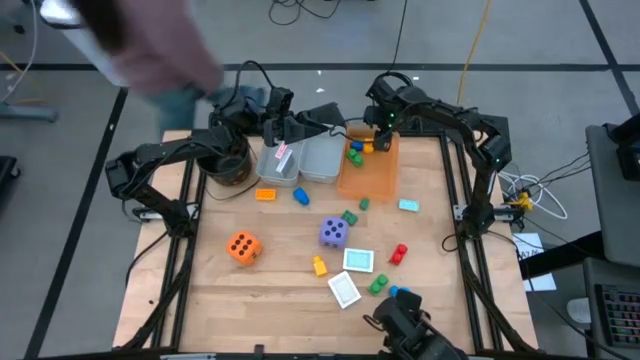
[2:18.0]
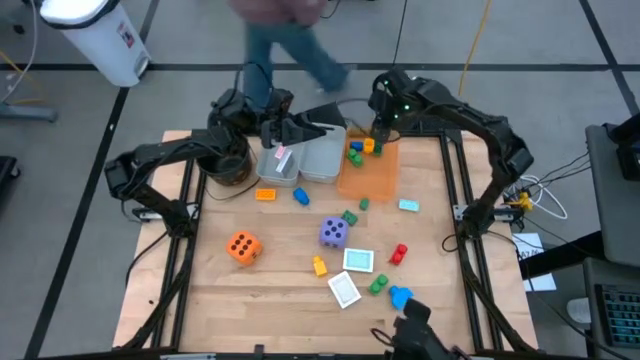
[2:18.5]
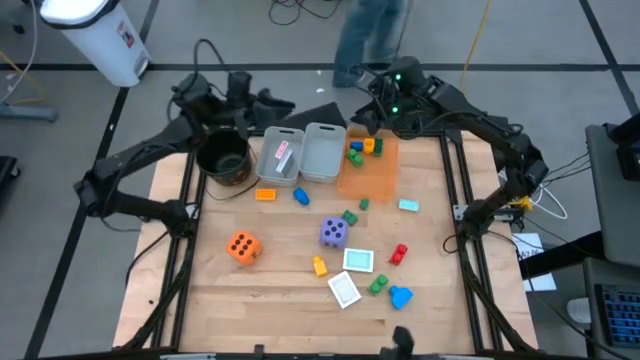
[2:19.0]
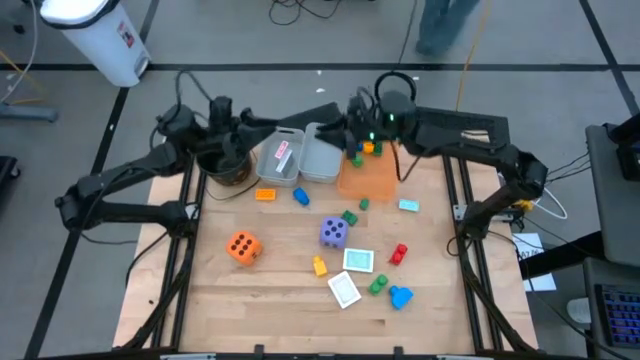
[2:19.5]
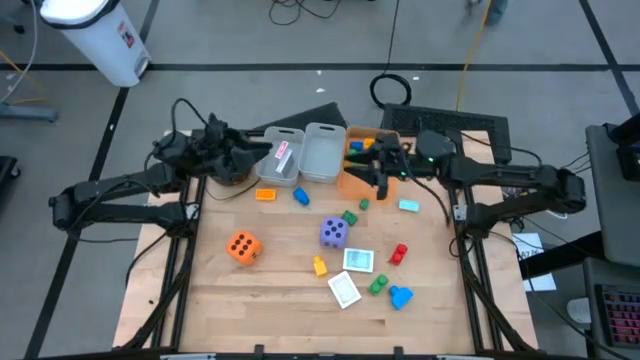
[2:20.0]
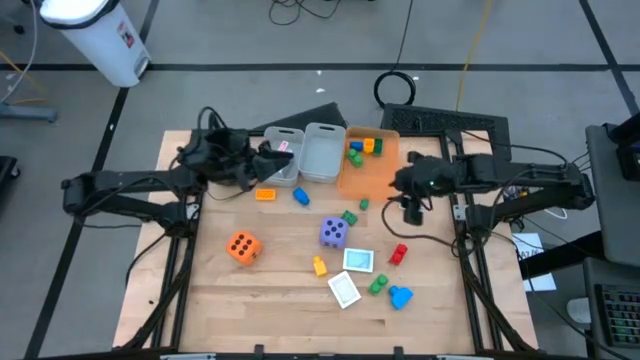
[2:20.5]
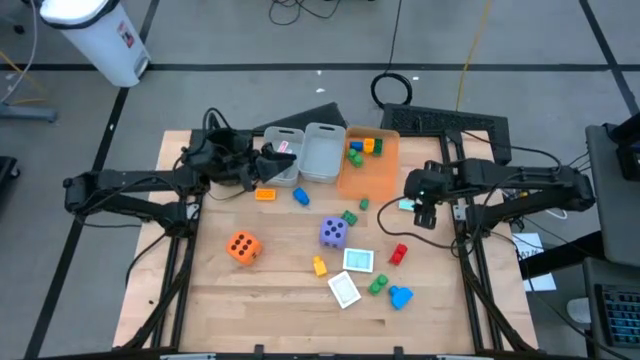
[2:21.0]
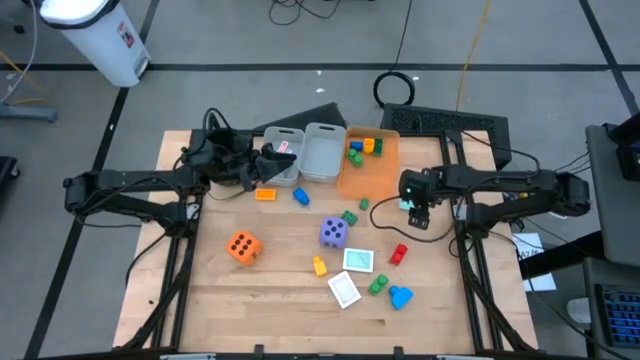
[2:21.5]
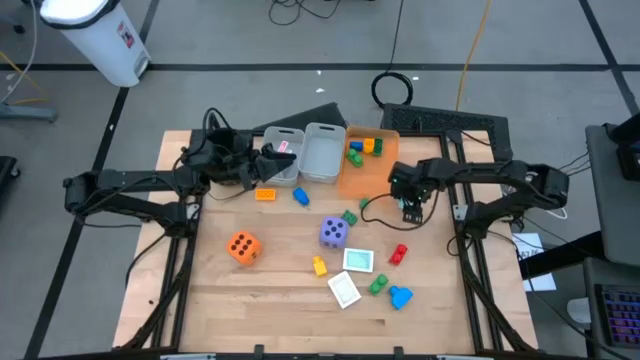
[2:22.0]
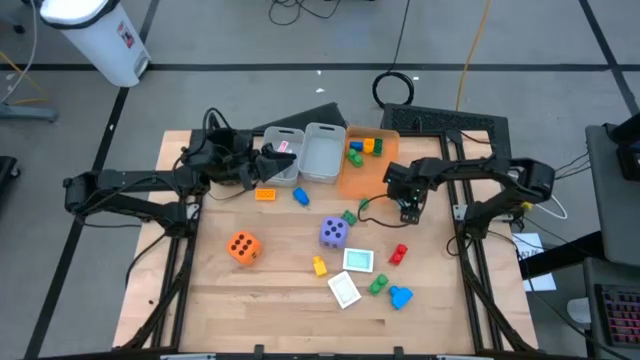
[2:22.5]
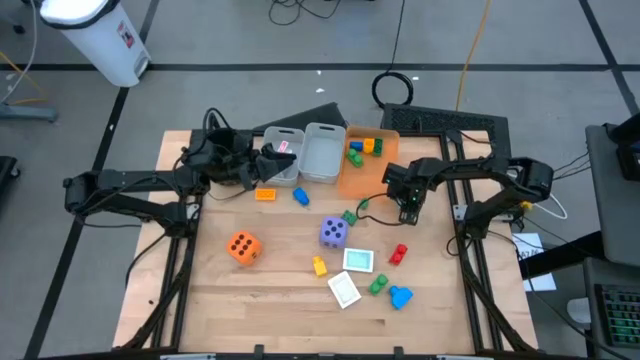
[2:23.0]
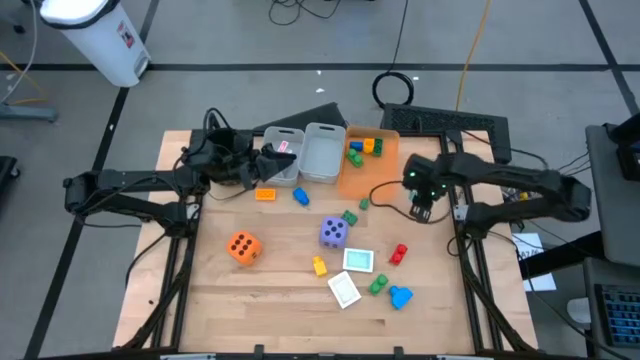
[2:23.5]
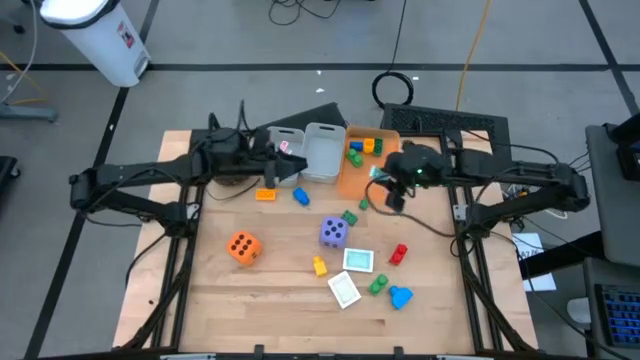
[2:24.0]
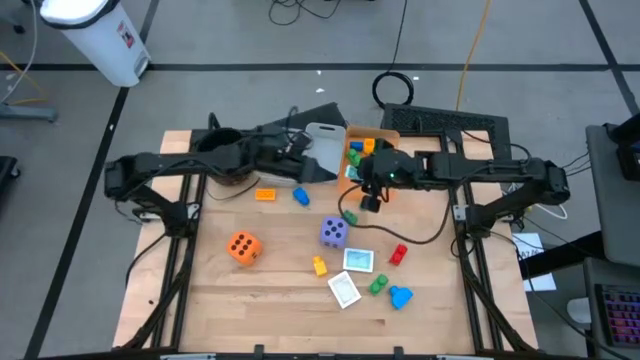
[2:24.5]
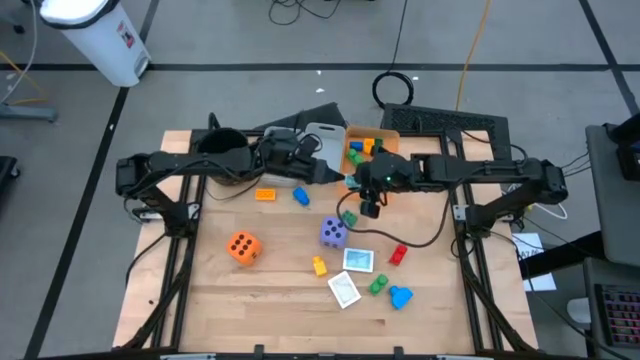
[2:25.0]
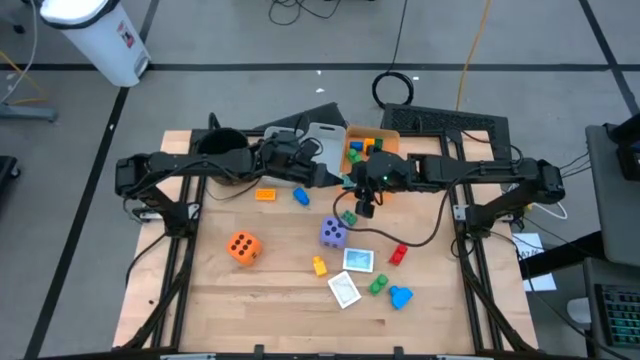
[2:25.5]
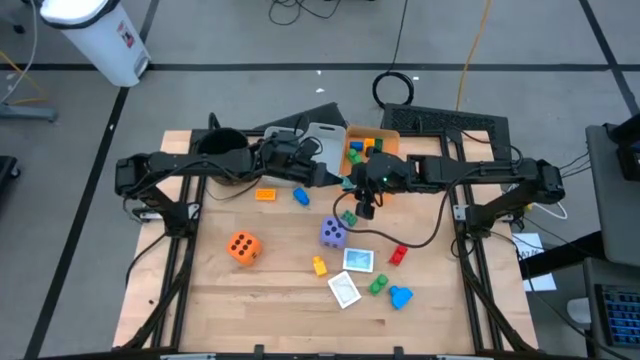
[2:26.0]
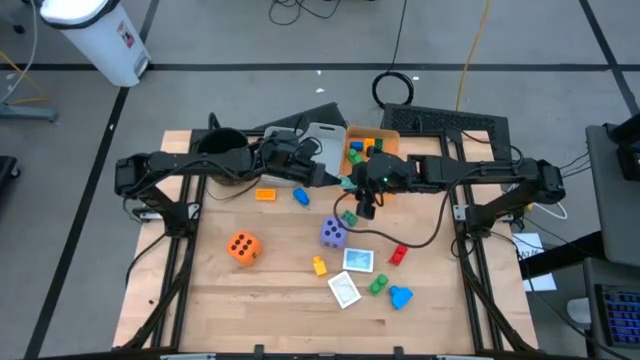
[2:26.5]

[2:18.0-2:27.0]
Task: Pick & Place Toys
Put the light blue game piece into the orange bin

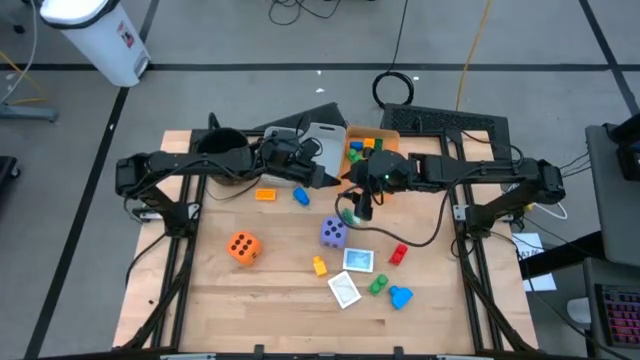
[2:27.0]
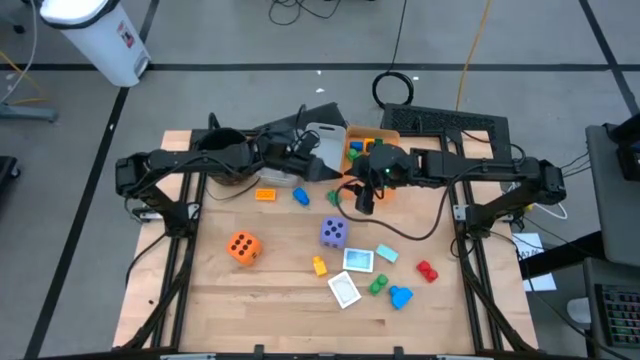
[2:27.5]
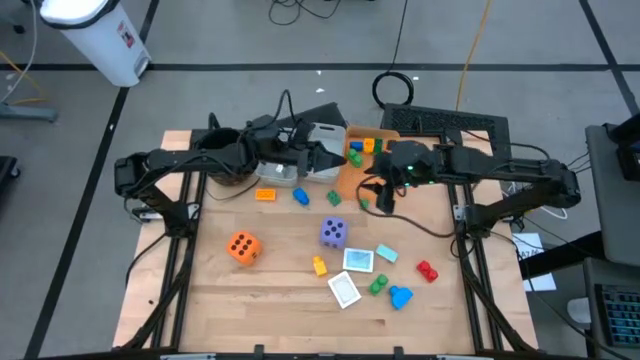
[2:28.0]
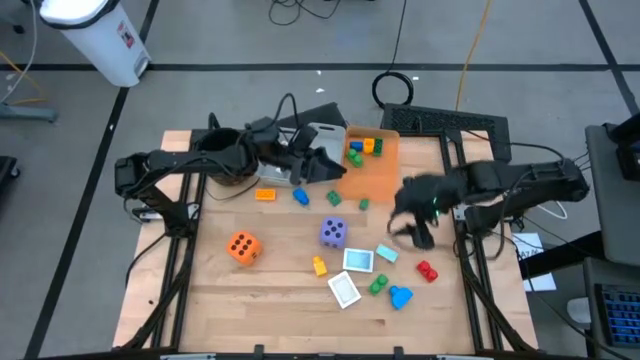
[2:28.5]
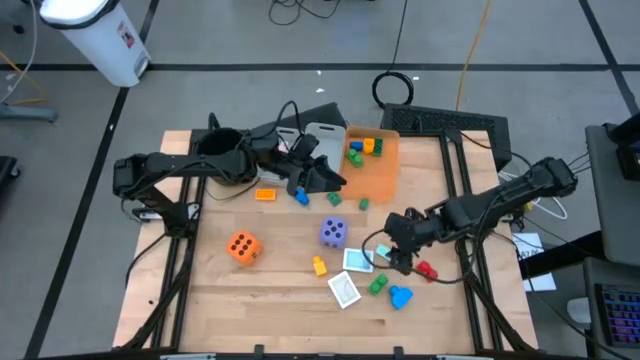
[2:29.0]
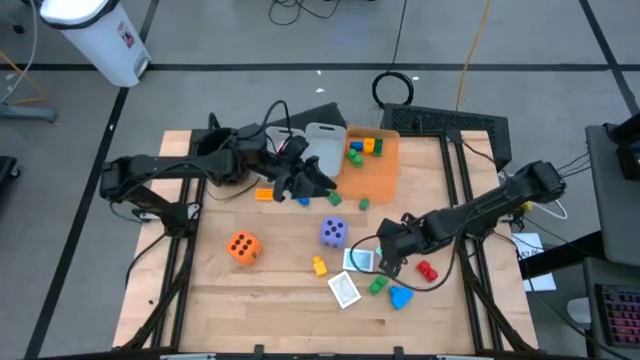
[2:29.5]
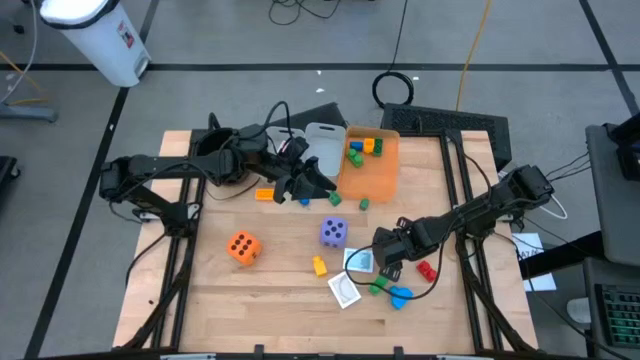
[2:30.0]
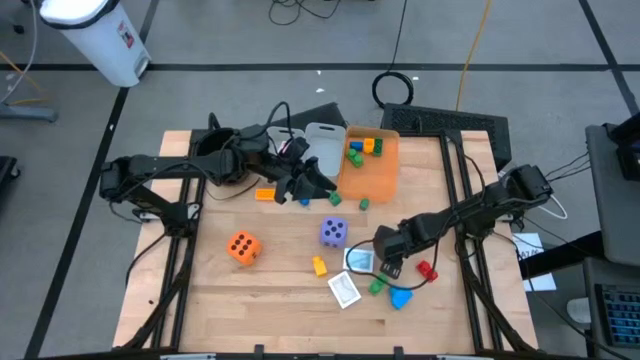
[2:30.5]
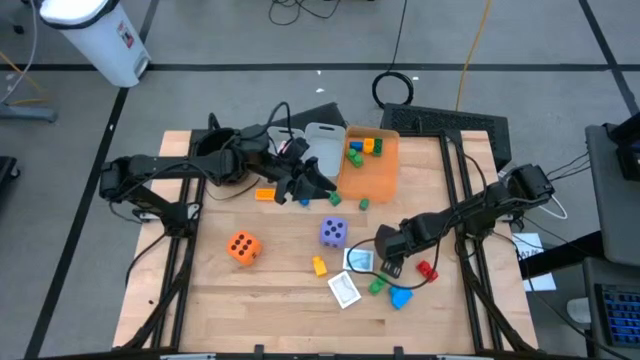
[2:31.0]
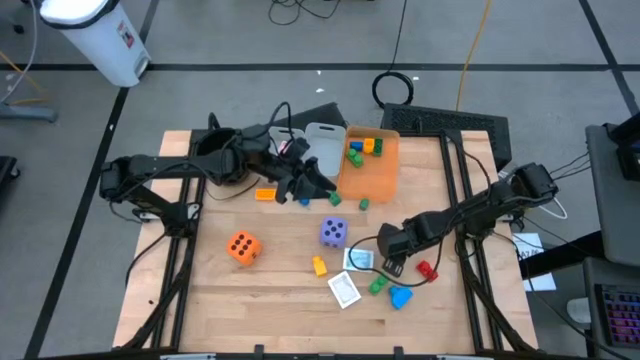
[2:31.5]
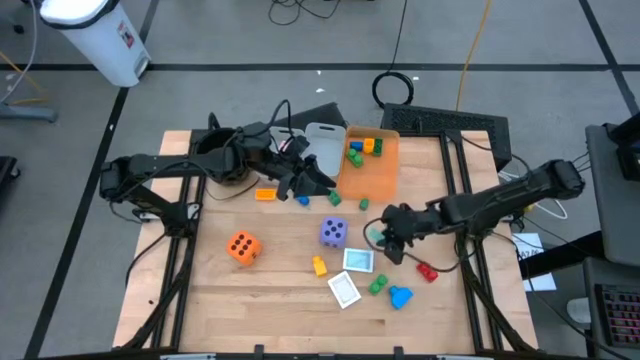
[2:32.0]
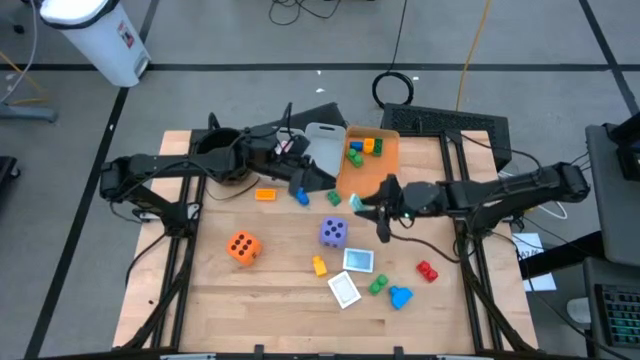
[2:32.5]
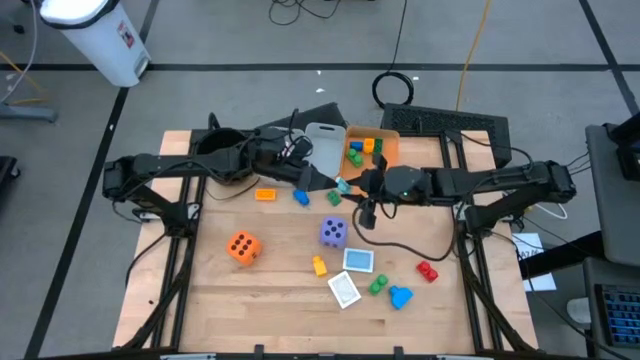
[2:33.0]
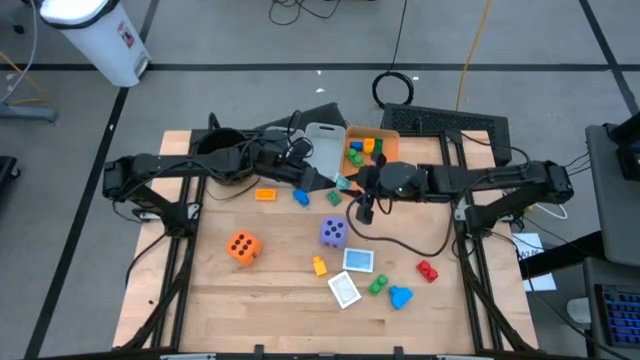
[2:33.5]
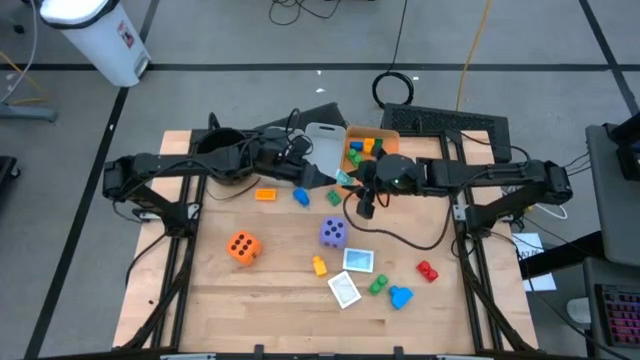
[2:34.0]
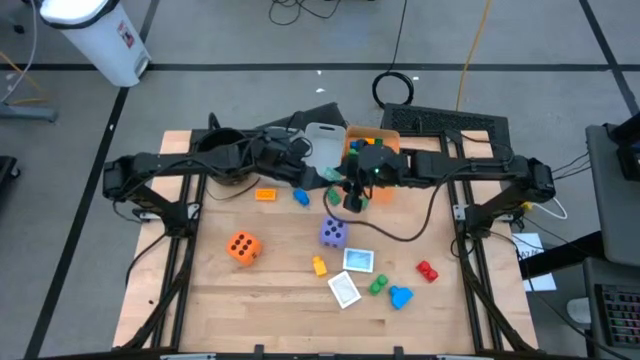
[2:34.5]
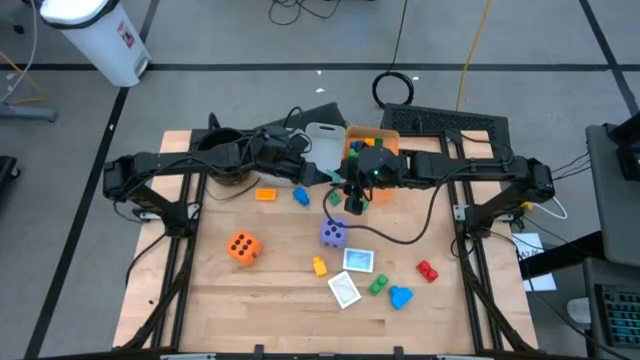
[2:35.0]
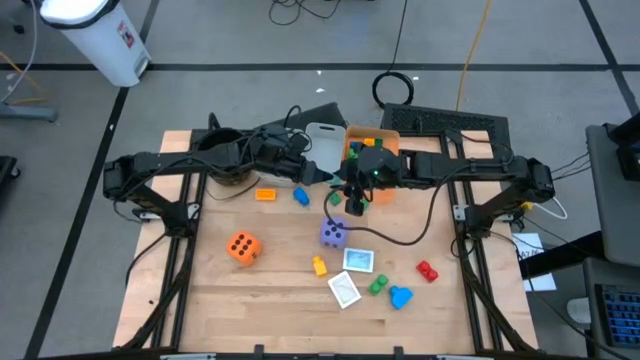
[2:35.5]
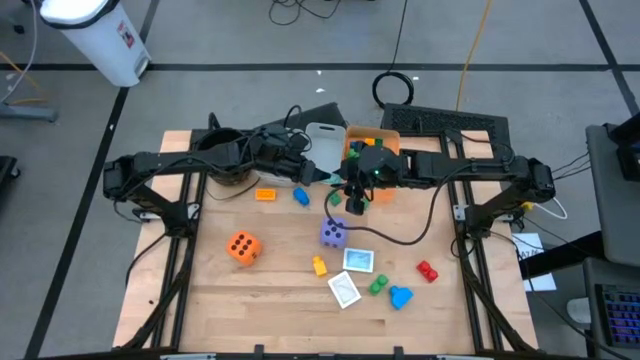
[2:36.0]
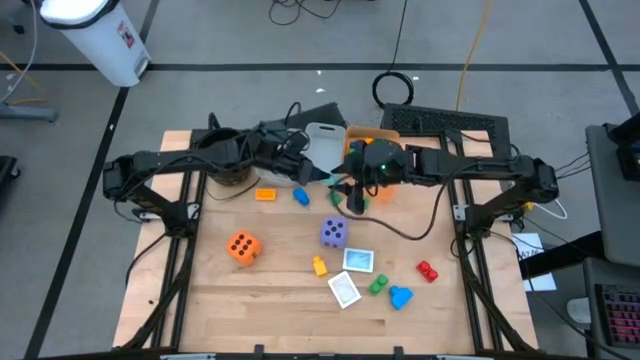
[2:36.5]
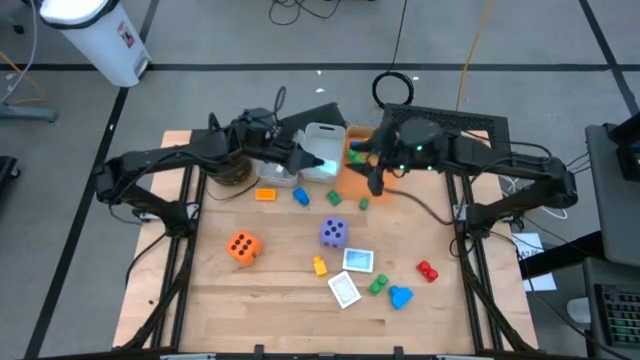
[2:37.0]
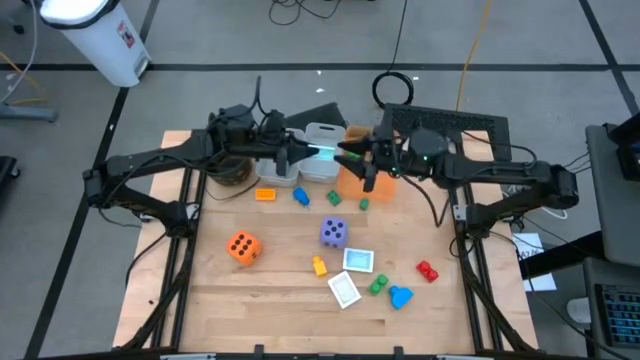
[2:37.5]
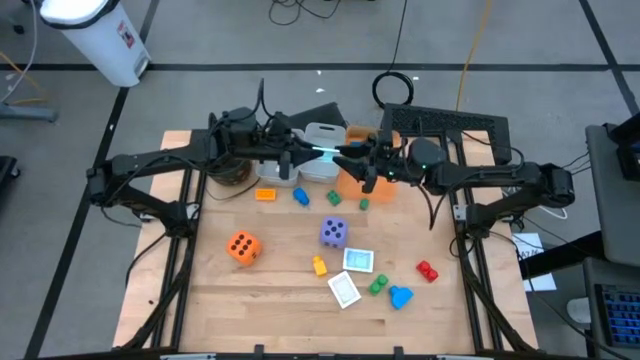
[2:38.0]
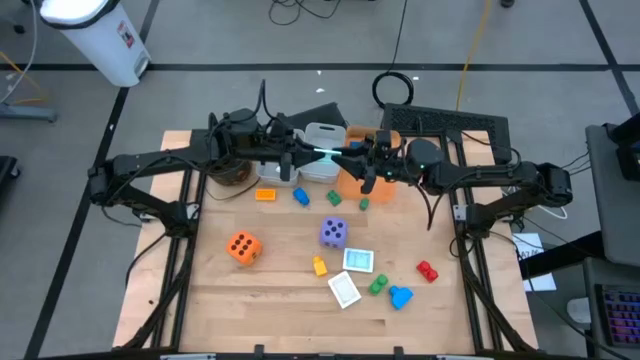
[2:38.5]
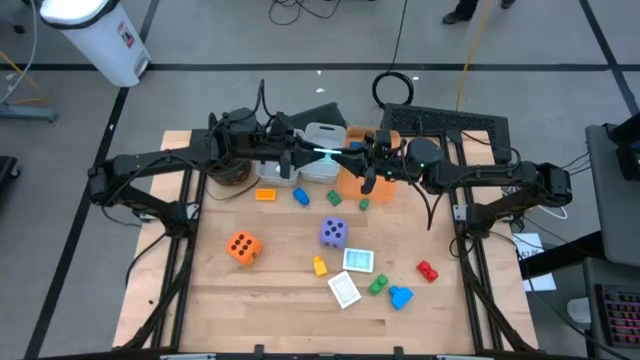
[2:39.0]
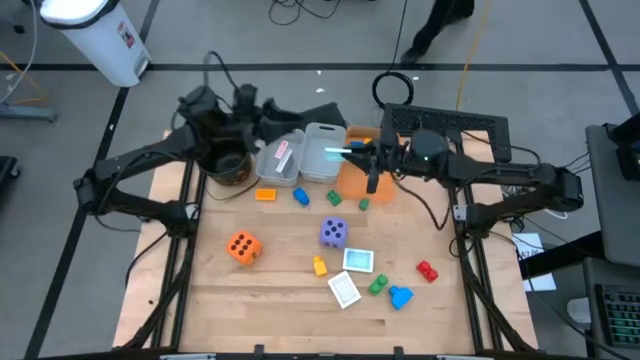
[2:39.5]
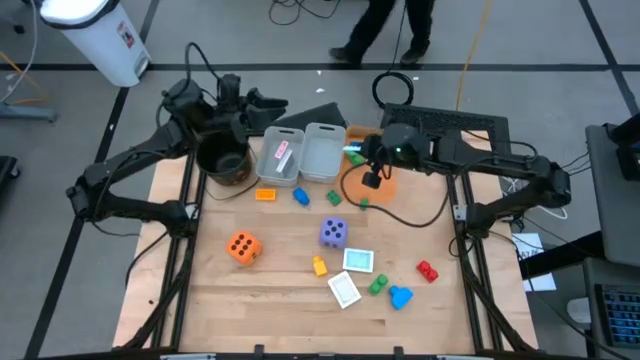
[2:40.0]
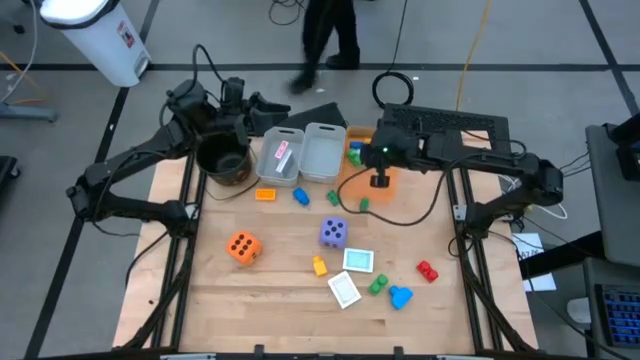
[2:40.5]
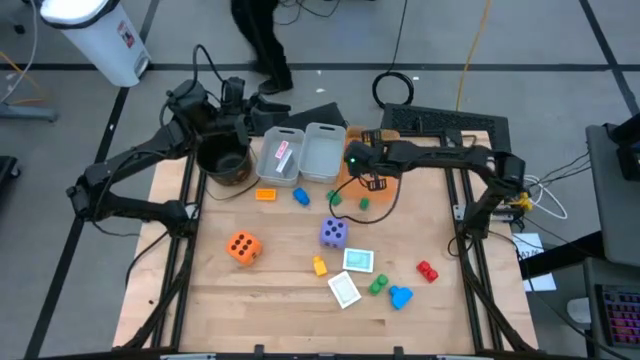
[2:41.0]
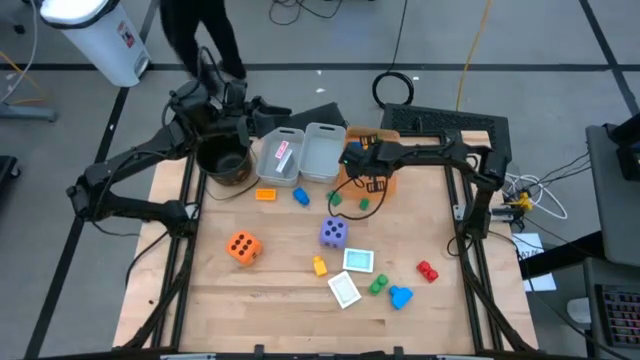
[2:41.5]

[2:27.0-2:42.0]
Put the light blue game piece into the orange bin
